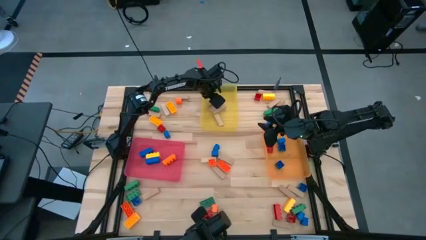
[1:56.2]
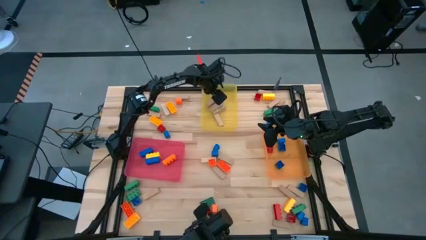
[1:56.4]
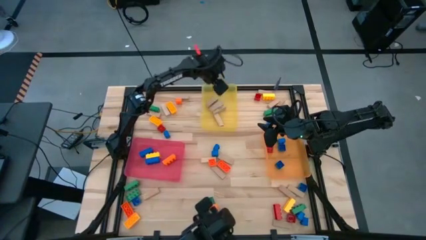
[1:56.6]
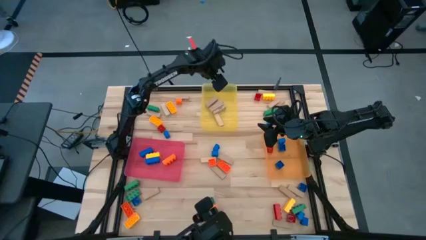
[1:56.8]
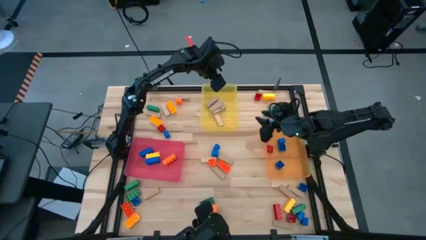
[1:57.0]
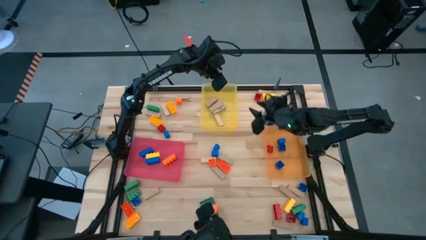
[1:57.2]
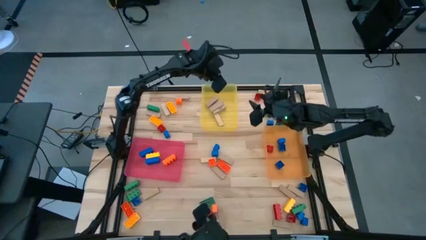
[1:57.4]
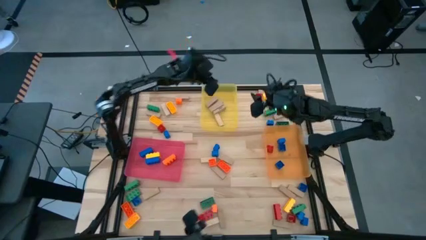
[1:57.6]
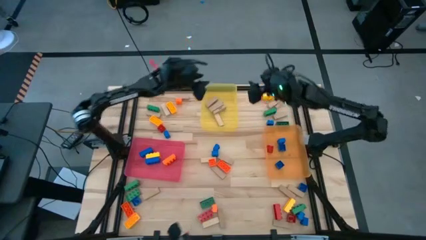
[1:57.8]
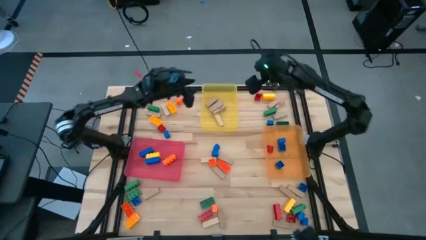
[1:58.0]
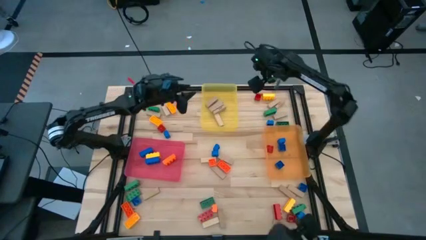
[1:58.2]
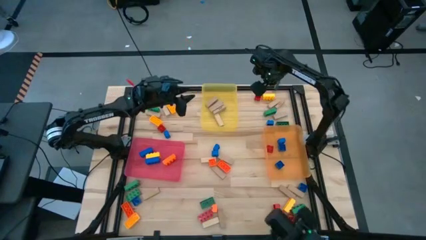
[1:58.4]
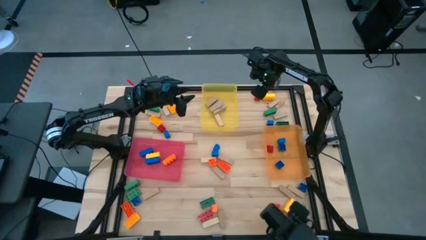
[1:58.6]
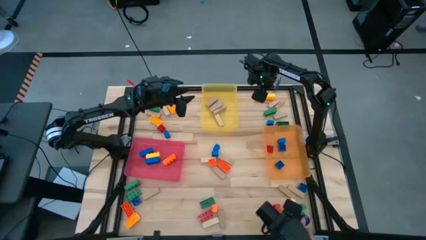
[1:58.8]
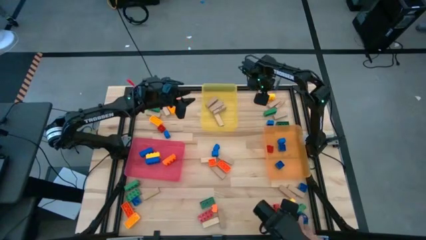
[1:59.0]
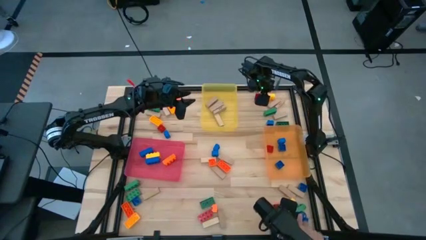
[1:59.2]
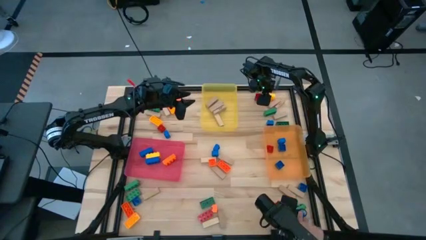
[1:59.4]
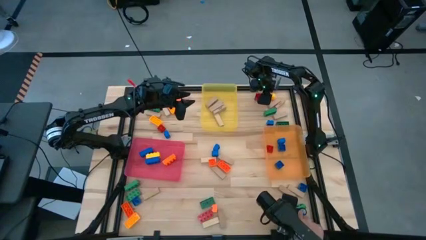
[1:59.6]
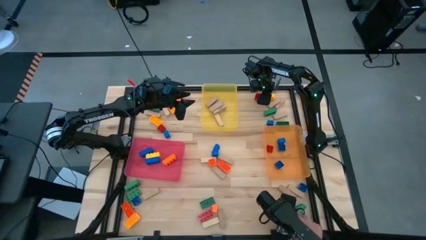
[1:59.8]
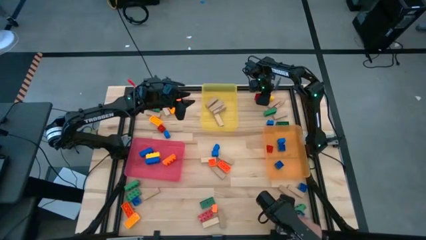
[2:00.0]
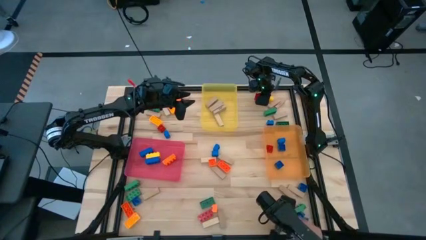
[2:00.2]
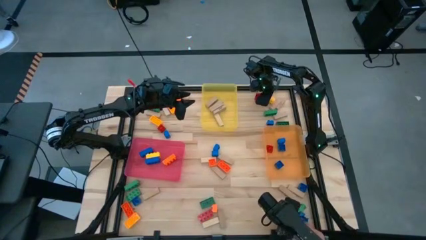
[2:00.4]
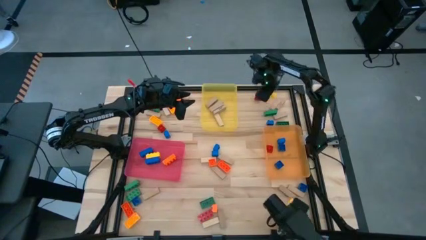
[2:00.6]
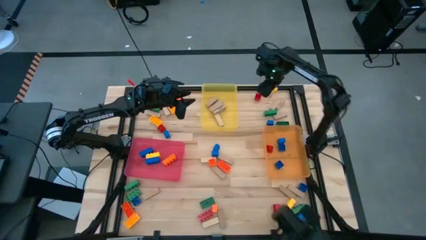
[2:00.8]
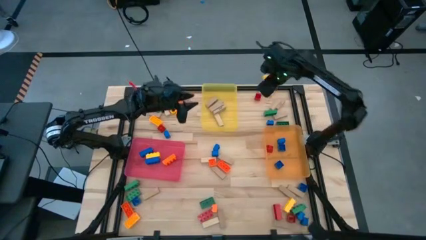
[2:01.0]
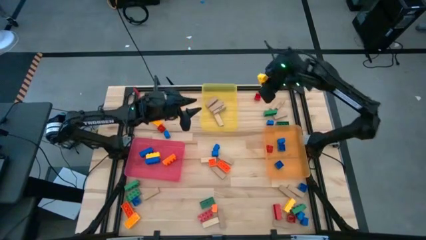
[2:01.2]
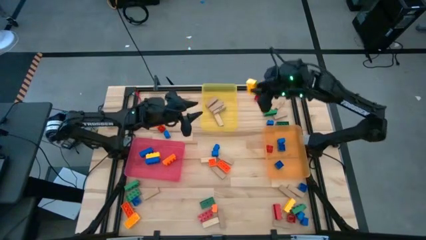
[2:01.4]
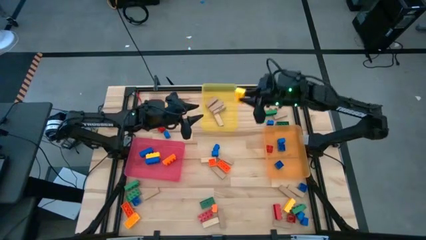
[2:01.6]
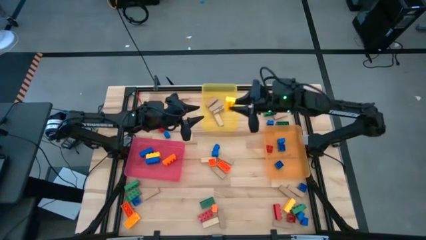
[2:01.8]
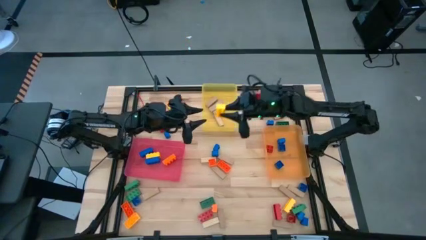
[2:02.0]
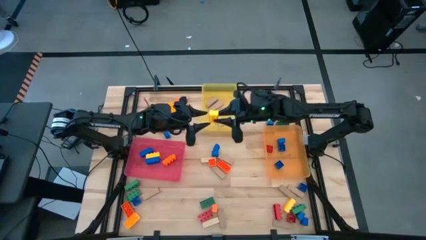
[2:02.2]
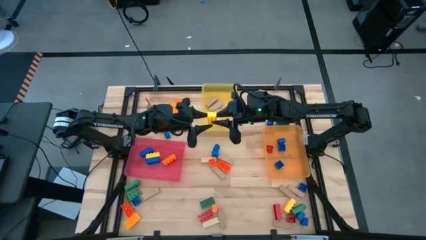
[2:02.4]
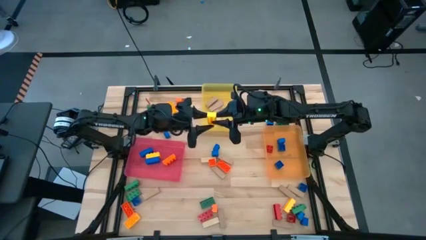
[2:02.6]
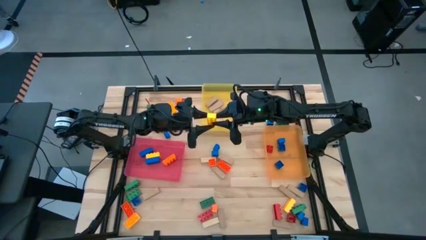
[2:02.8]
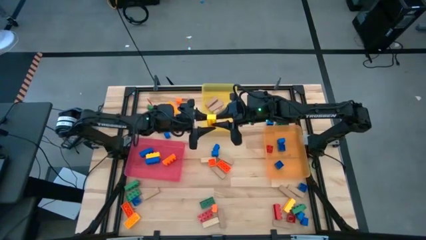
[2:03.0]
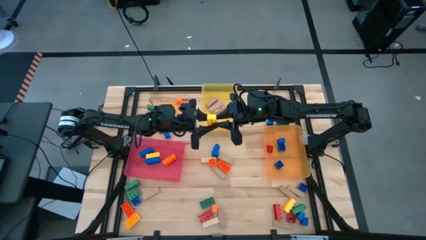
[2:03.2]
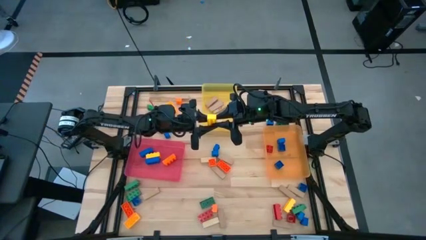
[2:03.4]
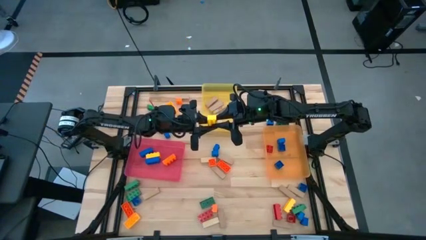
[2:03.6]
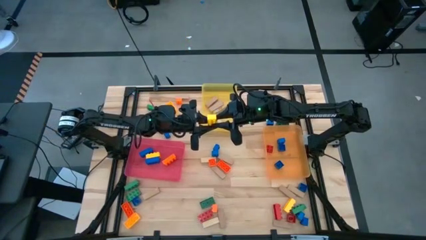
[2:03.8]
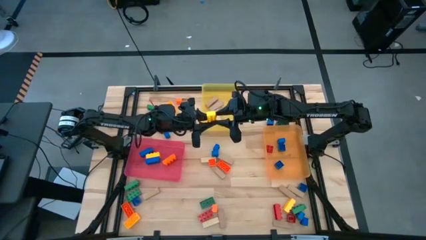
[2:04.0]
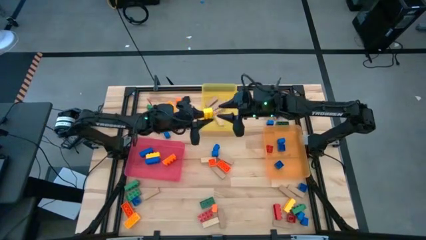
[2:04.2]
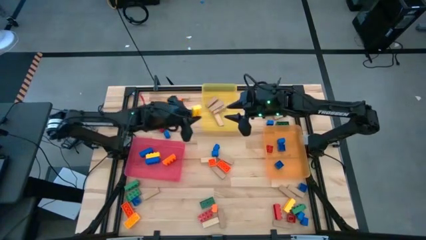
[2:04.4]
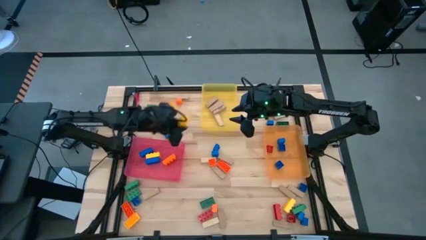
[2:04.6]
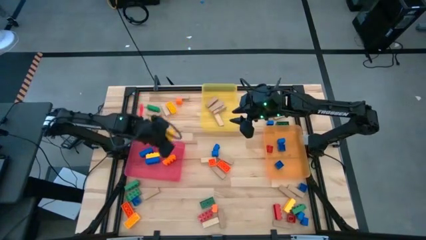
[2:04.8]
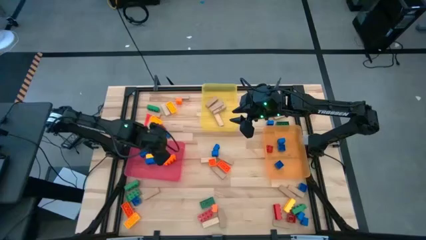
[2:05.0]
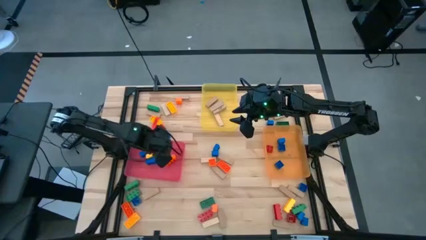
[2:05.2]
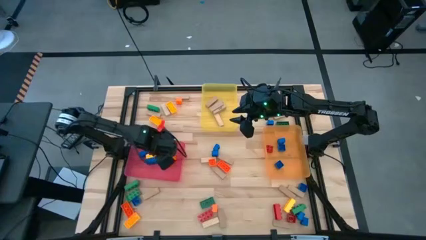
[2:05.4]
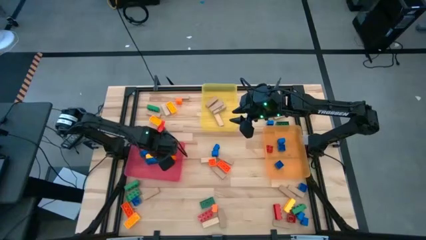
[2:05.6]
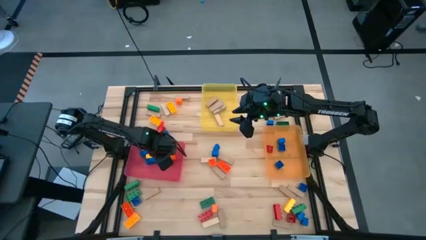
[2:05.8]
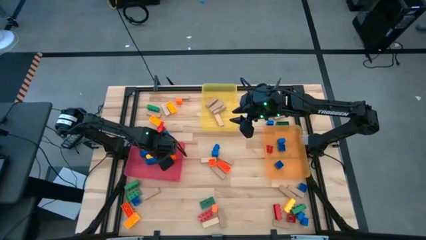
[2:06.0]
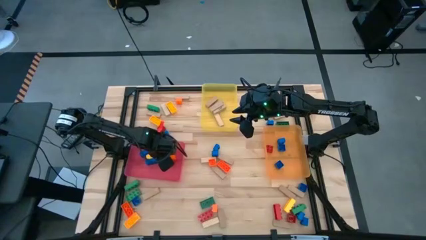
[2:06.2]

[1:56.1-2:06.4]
Task: Sort blocks by size
Put the 3 stud yellow game piece into the pink bin

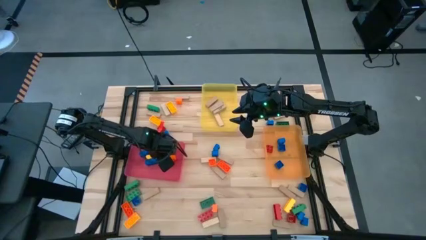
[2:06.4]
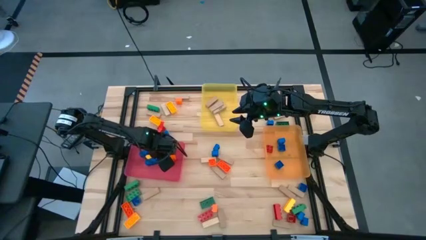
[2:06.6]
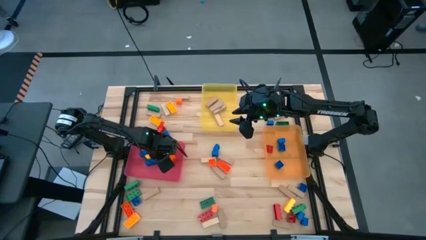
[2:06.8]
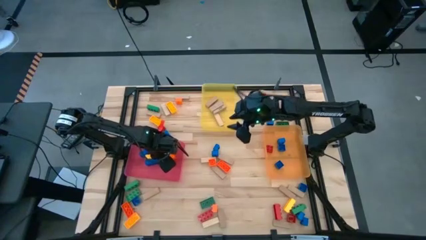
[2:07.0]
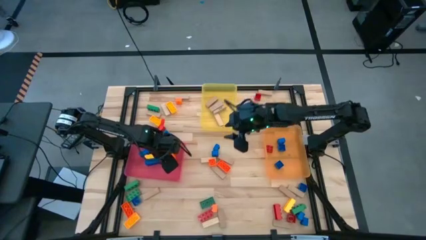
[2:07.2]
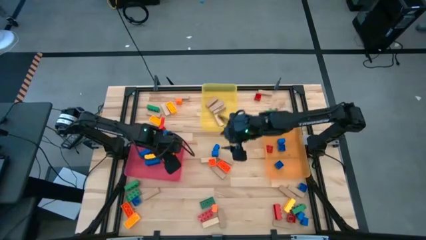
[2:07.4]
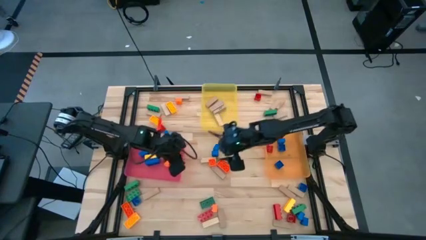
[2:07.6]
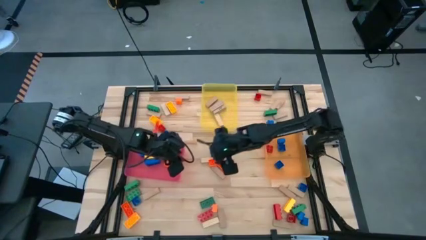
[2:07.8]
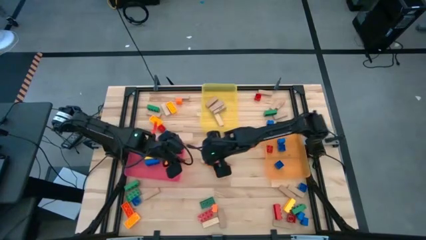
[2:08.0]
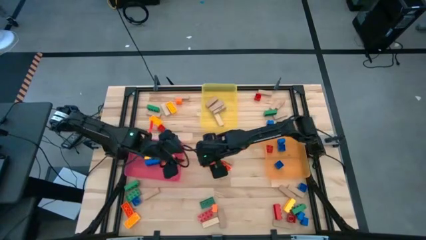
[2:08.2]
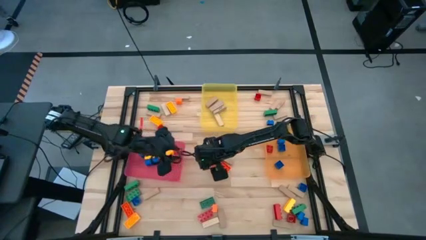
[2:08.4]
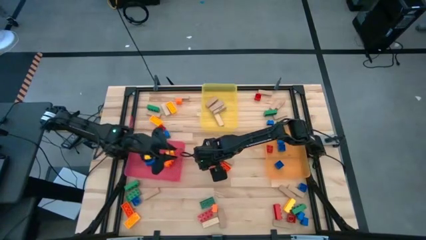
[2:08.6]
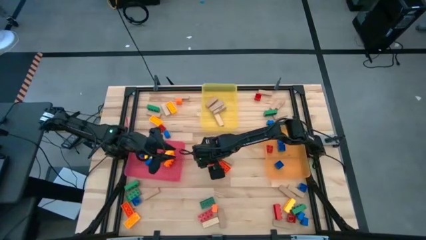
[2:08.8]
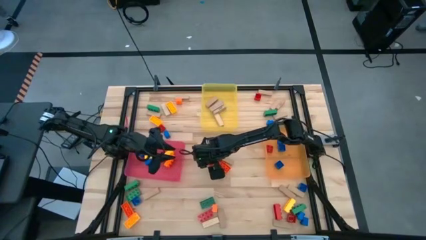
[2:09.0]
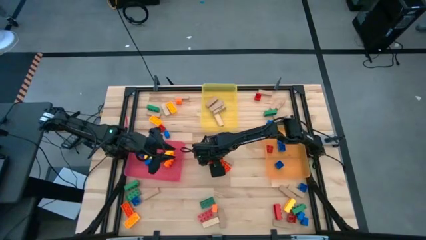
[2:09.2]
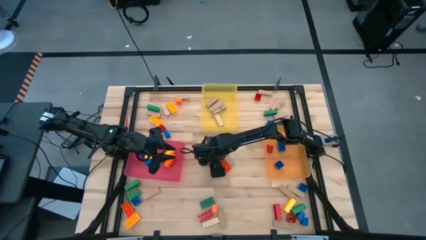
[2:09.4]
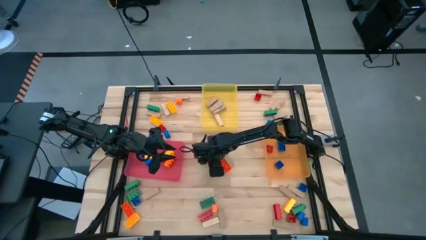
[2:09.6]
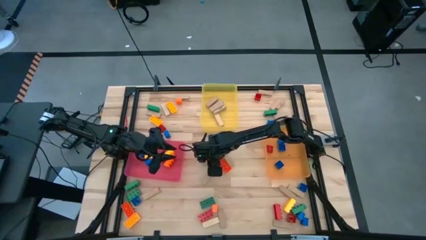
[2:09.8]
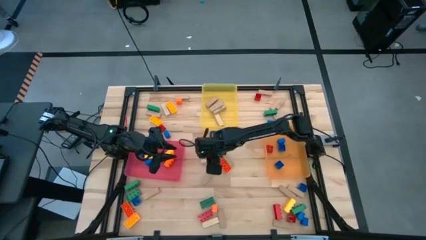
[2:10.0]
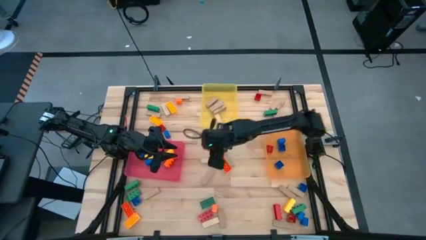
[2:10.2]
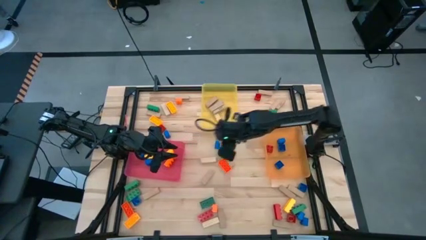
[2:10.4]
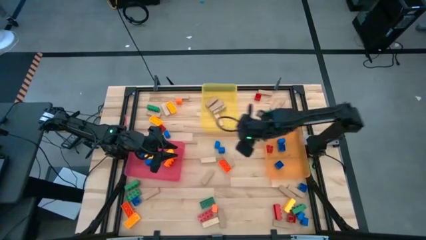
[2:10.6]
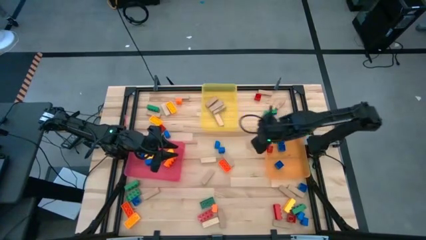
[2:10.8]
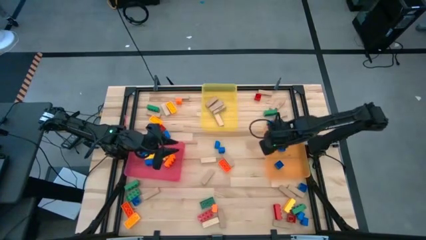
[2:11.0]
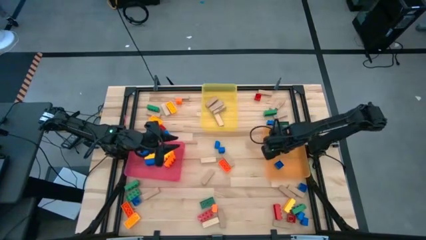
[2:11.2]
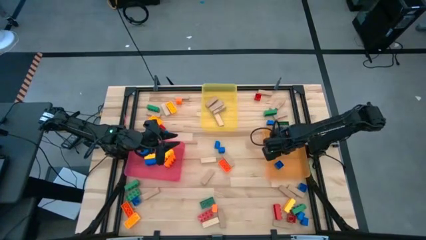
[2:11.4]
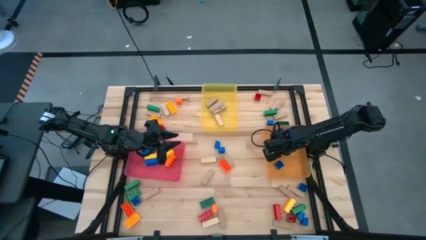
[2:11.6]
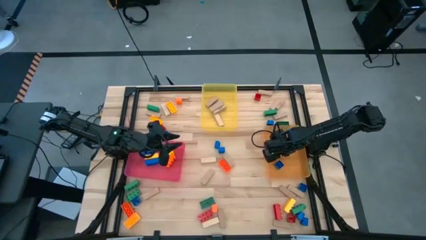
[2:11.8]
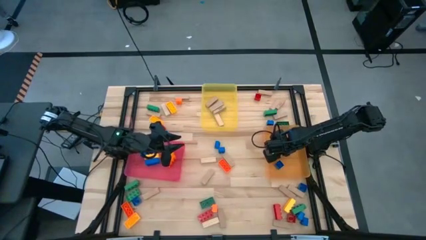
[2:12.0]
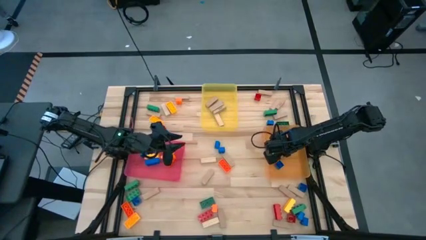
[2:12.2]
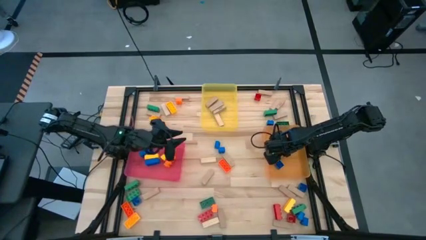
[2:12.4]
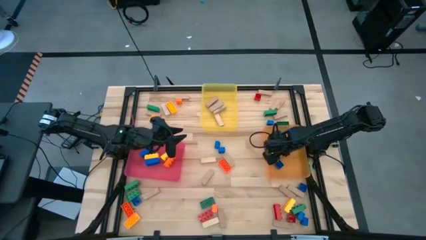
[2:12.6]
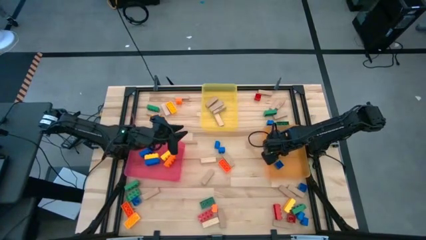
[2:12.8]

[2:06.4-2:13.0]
Put the 1 stud orange game piece into the orange bin
